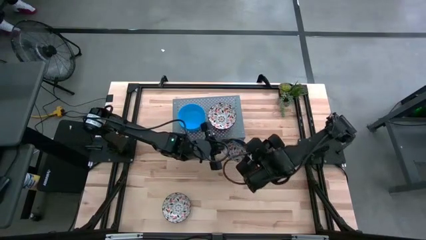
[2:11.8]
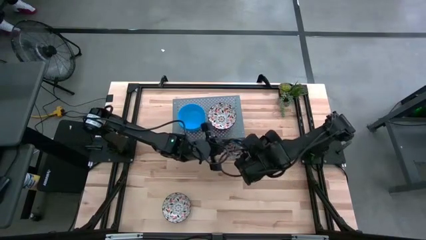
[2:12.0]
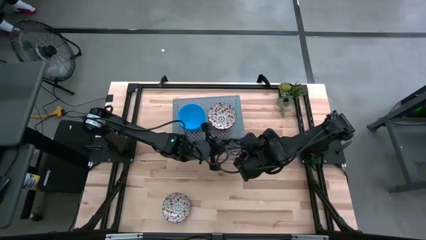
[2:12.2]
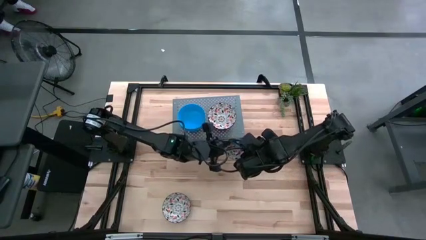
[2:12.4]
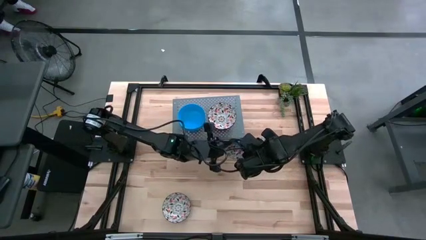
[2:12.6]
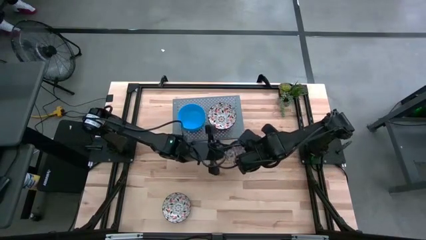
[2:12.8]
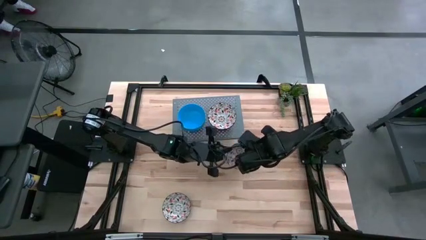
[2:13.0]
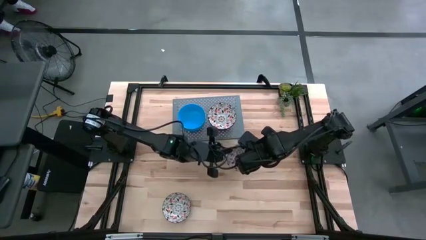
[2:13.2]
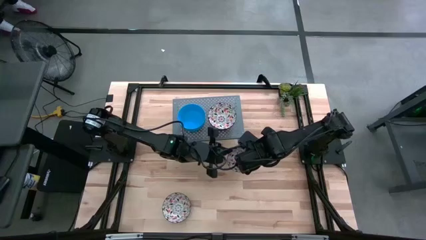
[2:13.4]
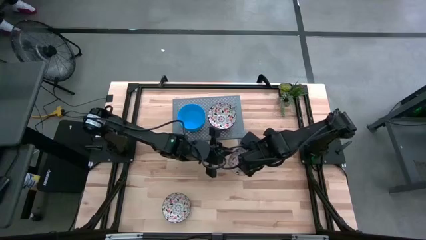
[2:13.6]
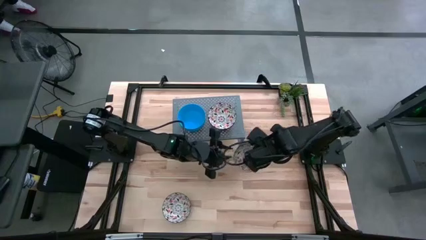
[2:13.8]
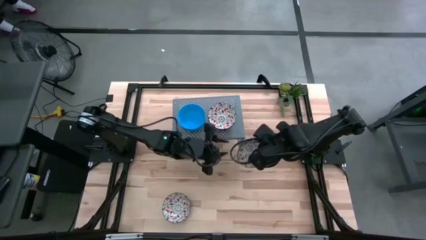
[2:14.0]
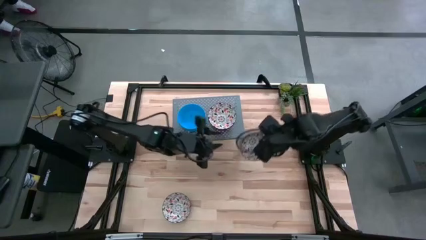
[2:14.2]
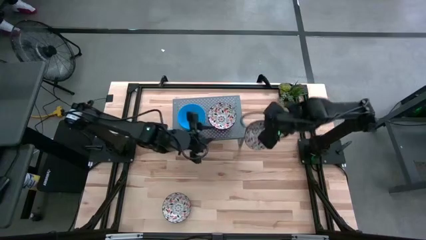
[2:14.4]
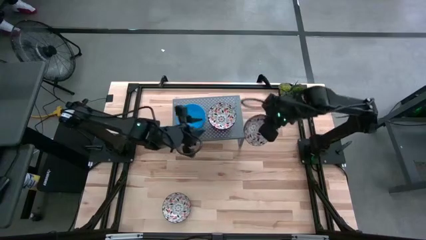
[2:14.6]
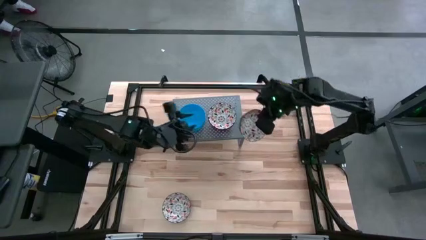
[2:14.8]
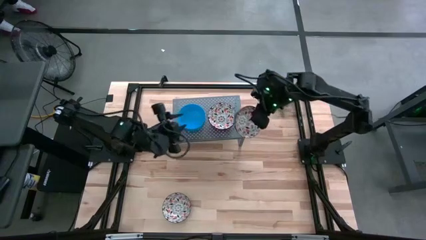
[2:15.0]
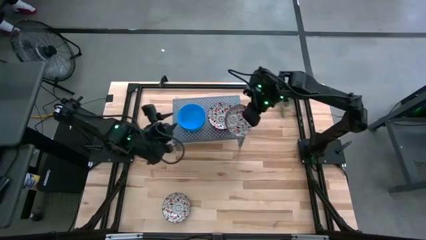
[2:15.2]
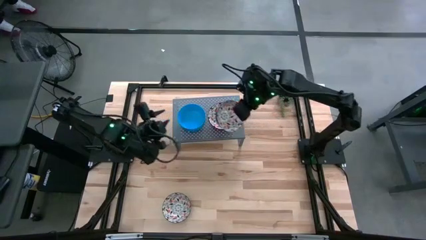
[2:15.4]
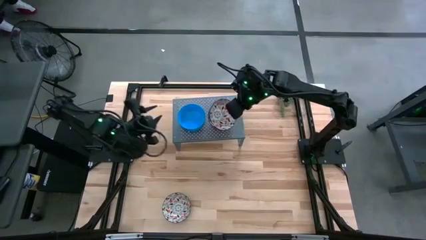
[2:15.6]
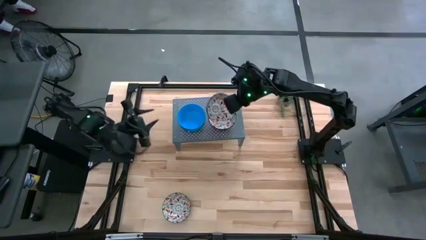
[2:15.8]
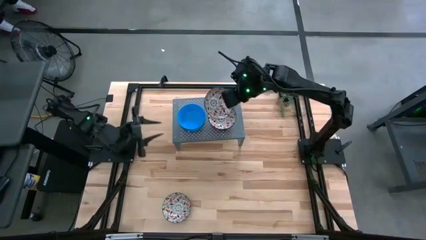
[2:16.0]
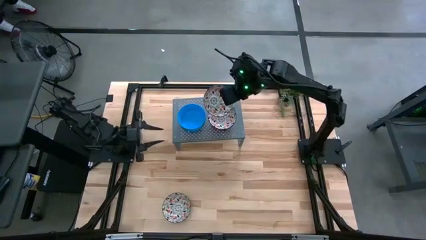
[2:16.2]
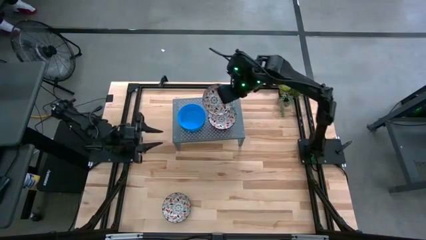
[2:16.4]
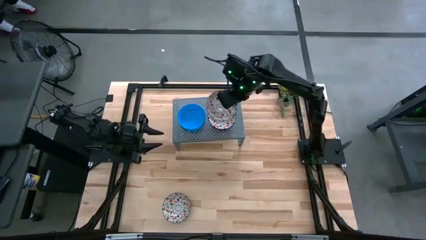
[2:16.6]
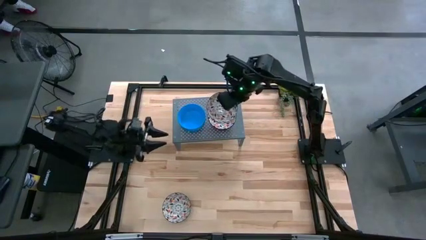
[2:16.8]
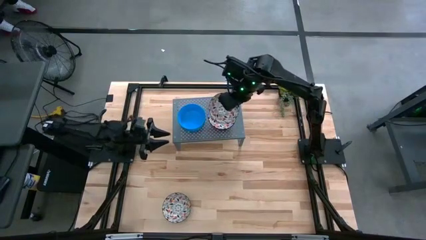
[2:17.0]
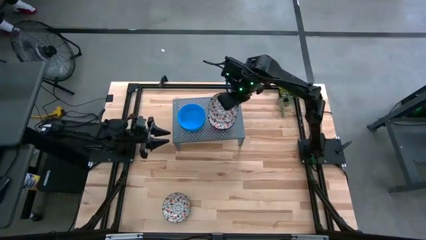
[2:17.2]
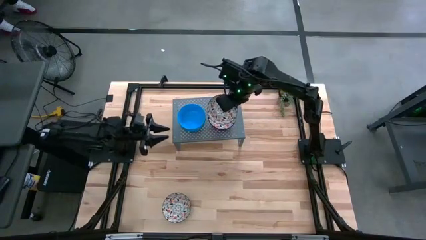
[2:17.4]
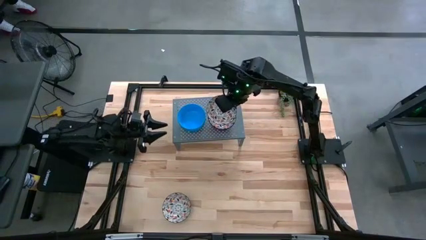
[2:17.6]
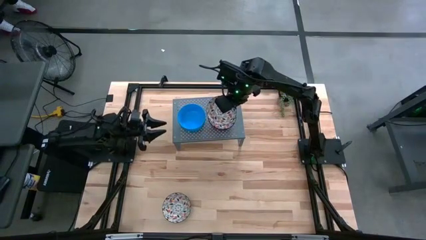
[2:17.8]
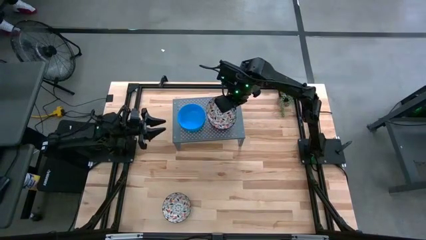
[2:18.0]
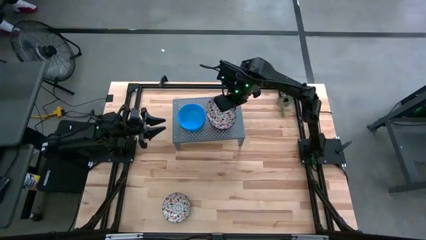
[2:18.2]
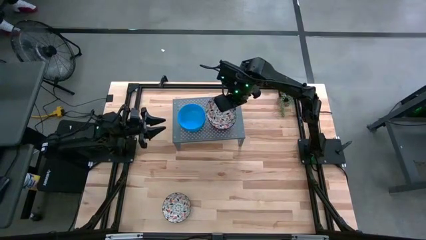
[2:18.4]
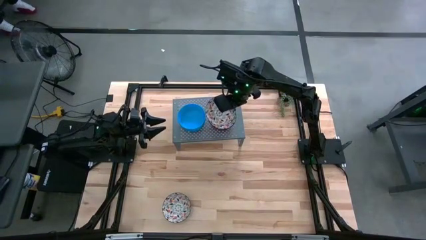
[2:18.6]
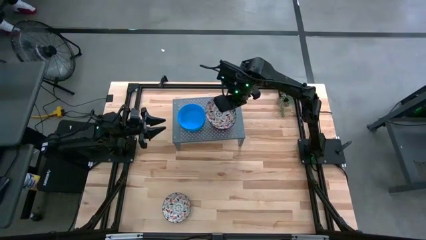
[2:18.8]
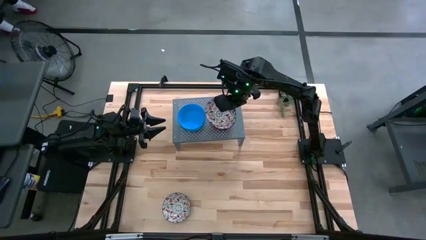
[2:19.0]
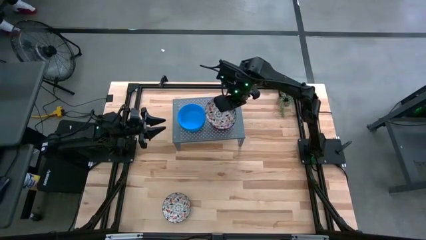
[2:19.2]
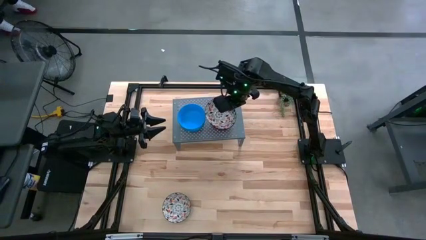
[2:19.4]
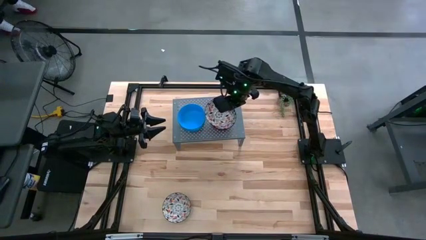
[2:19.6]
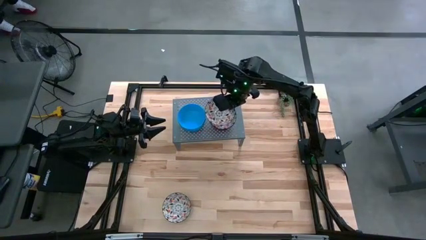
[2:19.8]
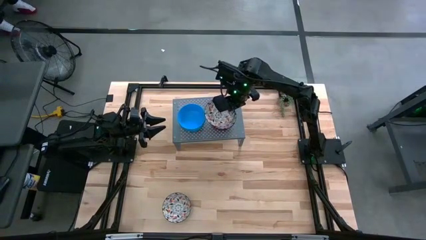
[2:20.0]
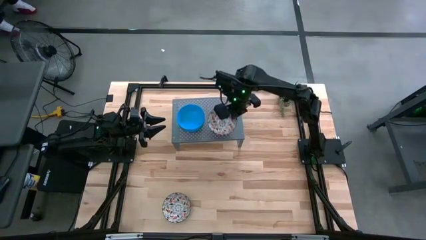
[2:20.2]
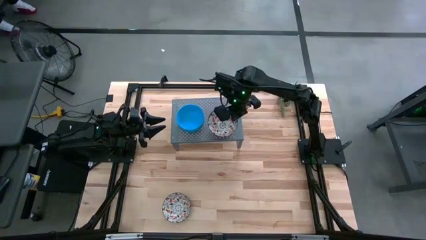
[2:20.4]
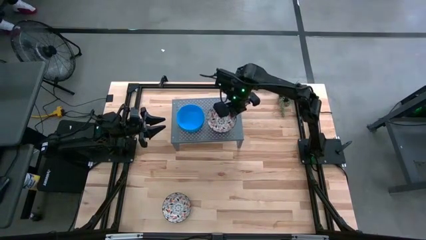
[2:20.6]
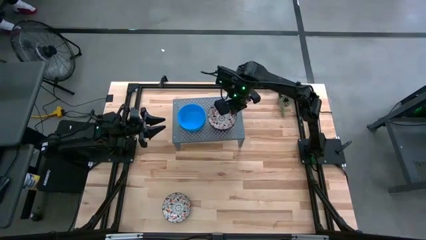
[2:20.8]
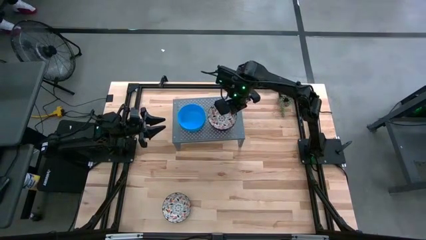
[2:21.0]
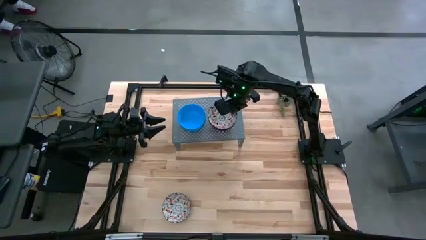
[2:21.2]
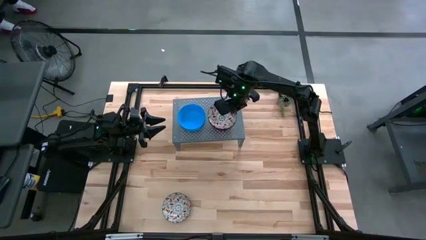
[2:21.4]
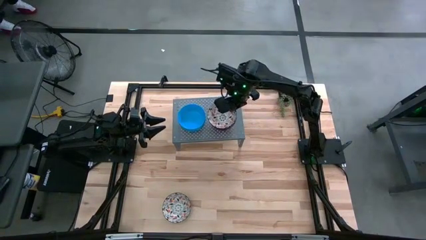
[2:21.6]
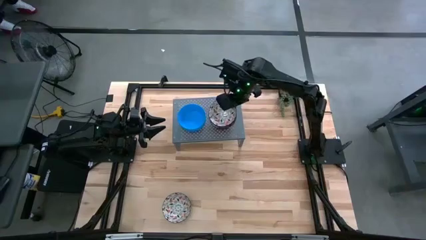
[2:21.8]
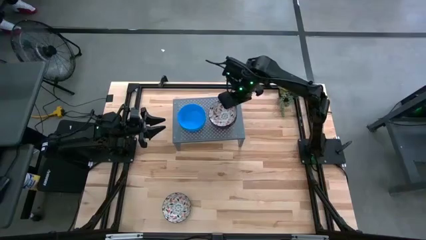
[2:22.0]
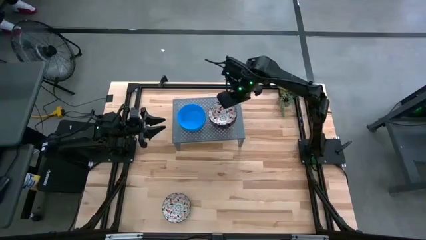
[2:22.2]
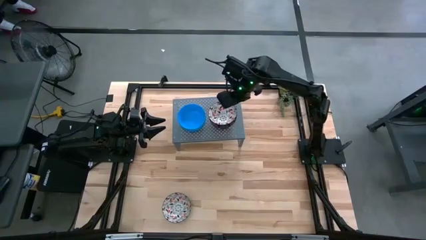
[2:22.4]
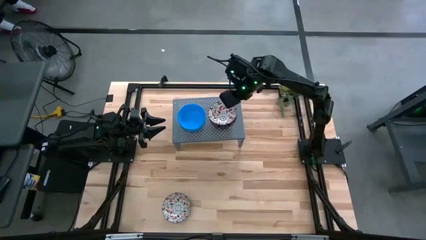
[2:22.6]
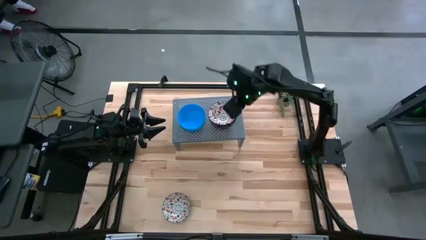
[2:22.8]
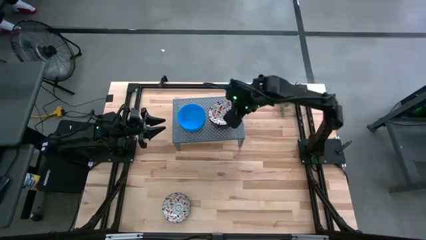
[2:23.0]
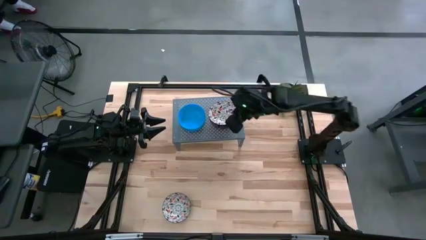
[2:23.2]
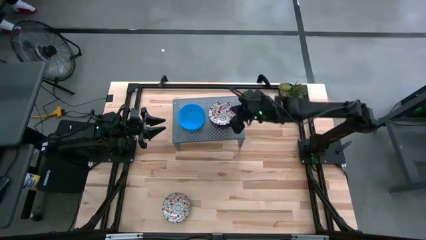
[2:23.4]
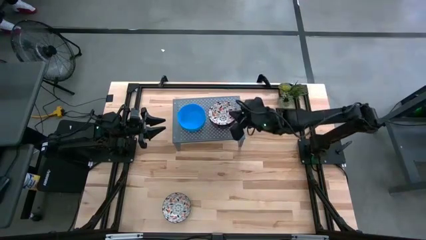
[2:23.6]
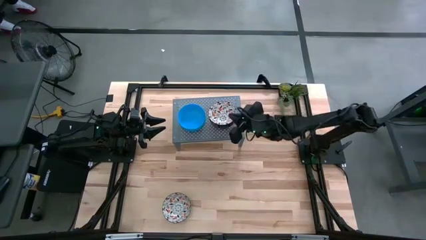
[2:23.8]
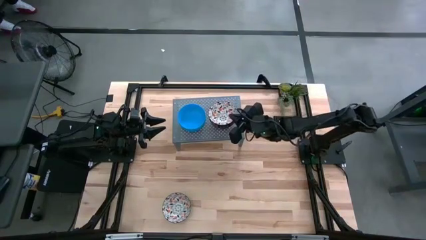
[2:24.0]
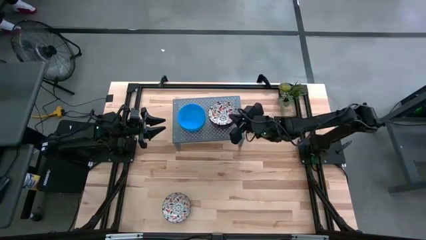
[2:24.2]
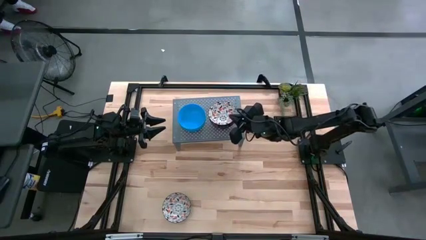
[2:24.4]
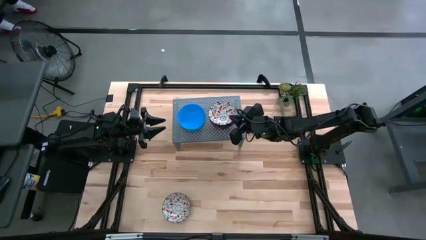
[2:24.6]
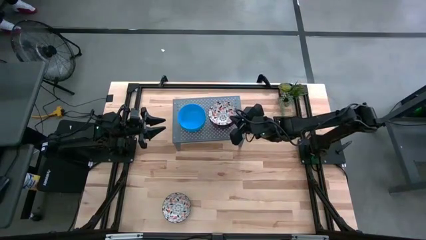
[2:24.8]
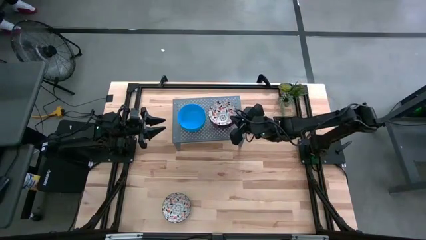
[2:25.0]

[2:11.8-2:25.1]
Task: Pick & Place Mini bowls
Stack the white bowl on top of the white bowls on the shelf

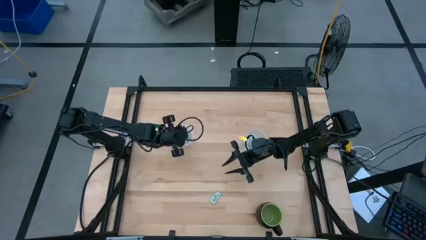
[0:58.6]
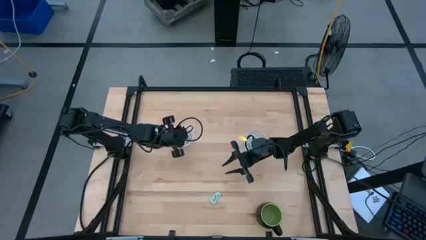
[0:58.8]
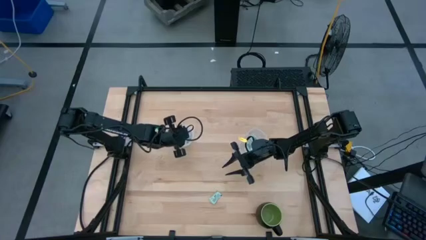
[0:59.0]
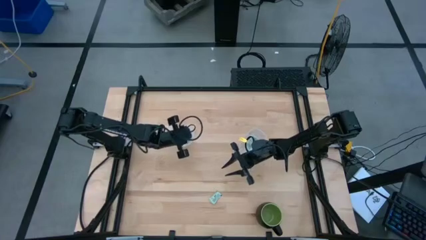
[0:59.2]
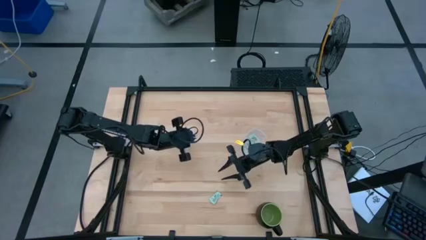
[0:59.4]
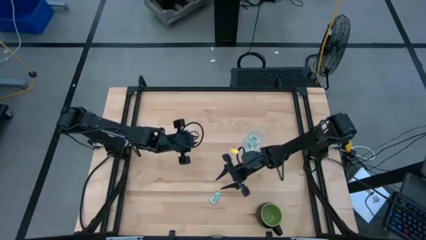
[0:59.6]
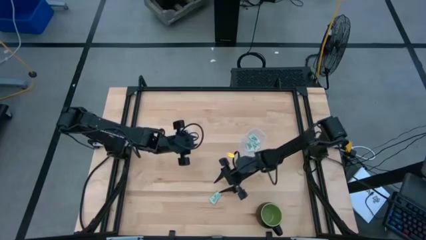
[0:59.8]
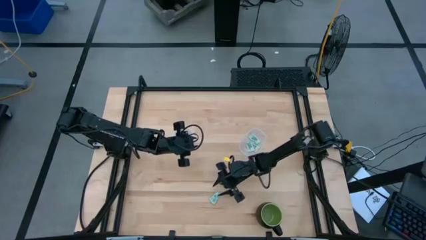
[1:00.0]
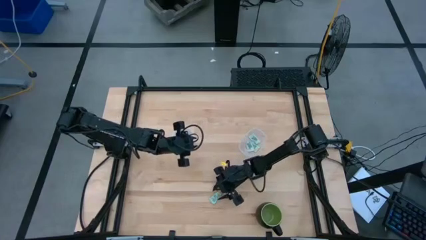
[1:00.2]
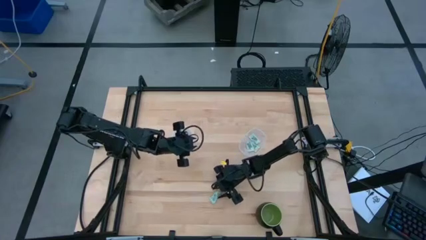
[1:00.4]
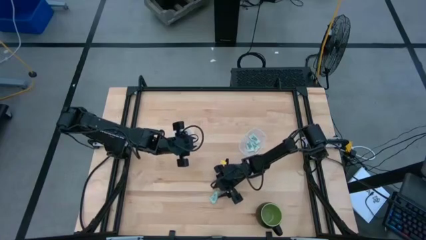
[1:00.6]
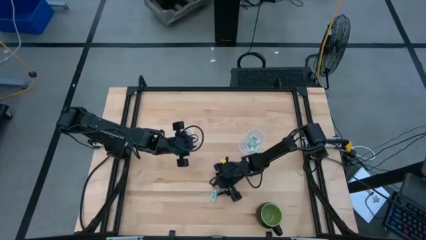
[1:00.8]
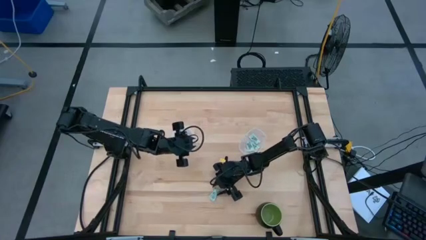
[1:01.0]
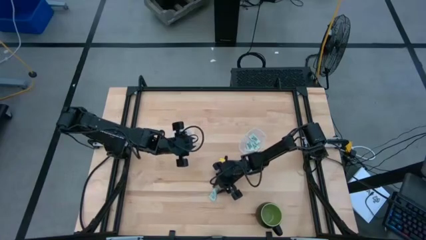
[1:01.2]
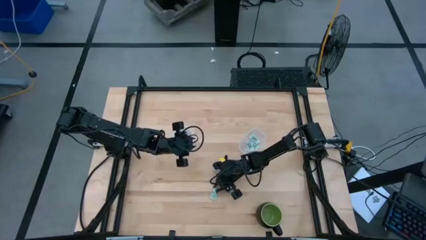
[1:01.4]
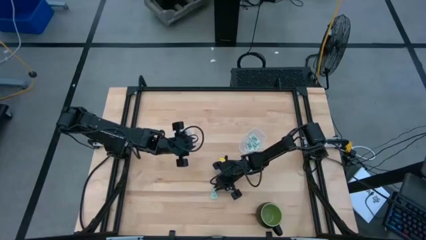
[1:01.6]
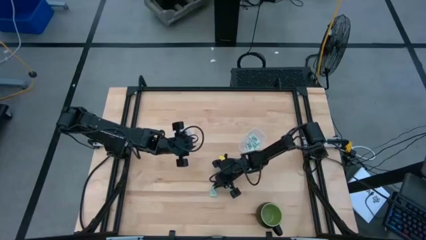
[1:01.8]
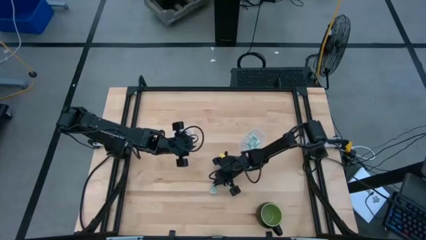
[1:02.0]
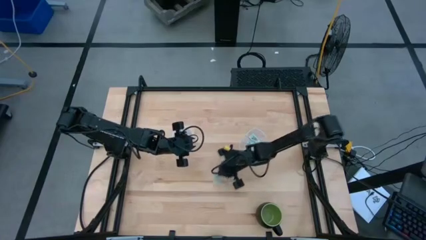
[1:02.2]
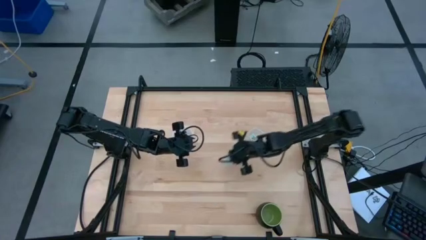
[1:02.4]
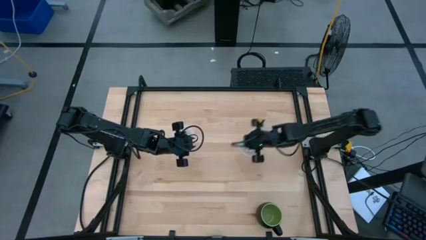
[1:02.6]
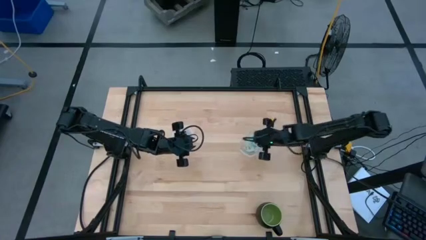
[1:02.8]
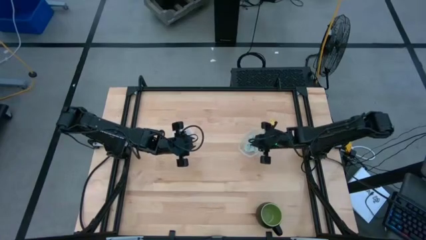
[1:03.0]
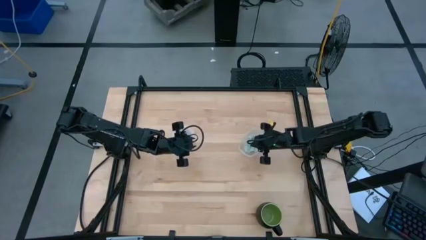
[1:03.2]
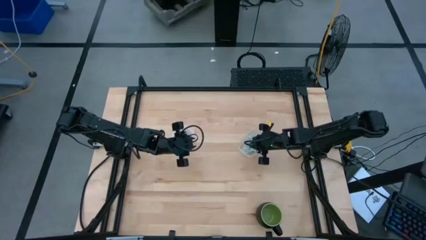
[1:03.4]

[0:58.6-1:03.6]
Task: Pick and place Stevia / Truvia into bins
Put the white stevia packet into the right transparent container
